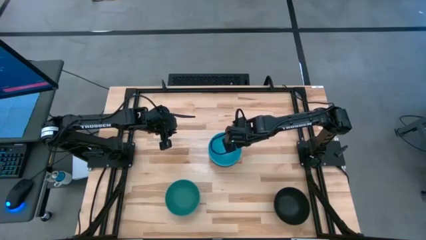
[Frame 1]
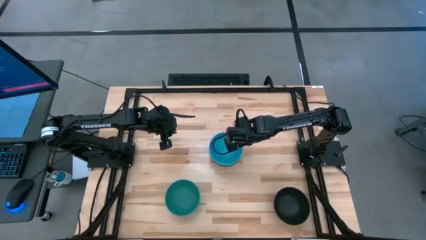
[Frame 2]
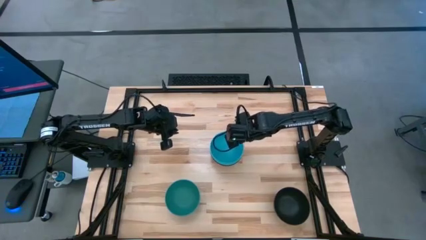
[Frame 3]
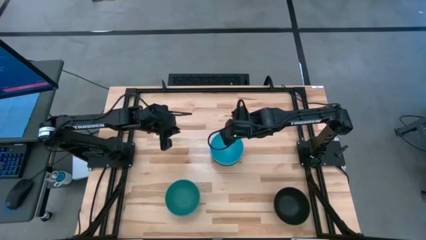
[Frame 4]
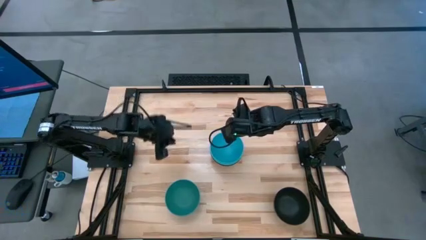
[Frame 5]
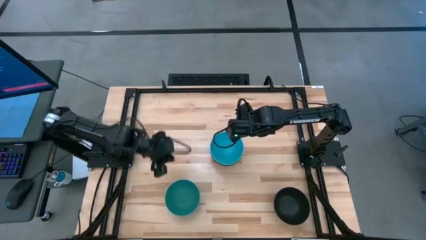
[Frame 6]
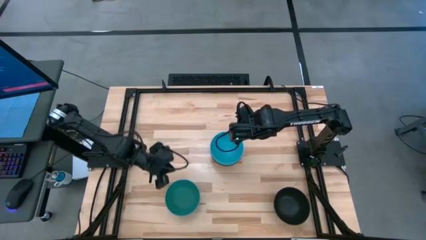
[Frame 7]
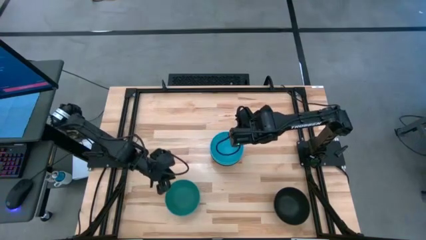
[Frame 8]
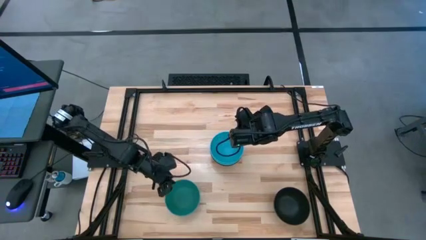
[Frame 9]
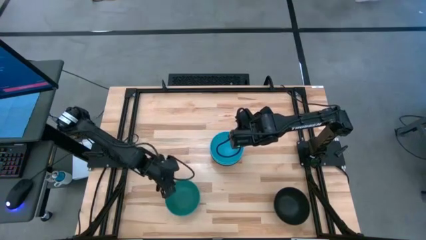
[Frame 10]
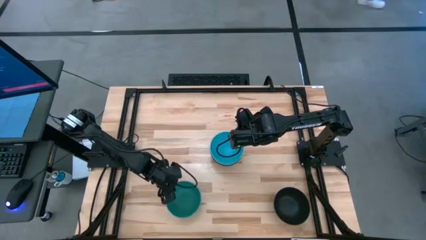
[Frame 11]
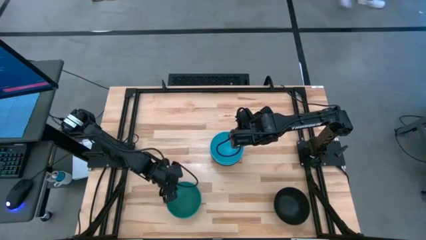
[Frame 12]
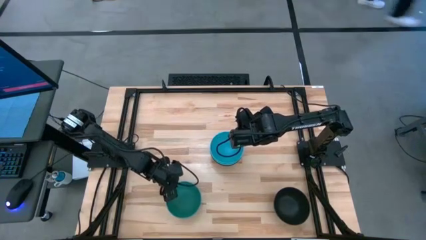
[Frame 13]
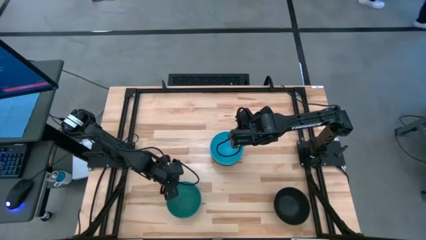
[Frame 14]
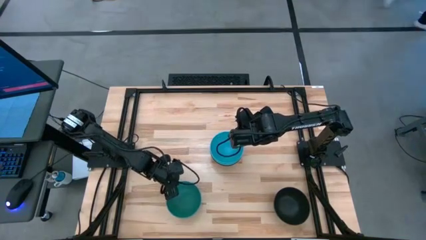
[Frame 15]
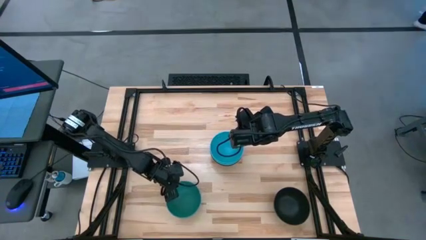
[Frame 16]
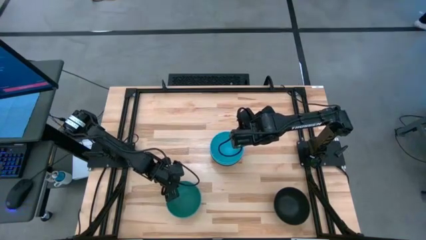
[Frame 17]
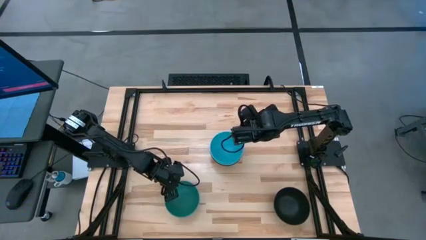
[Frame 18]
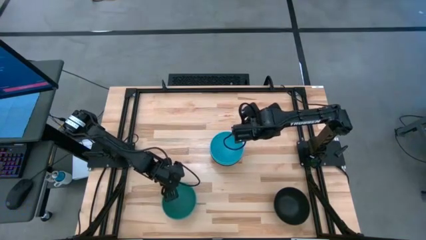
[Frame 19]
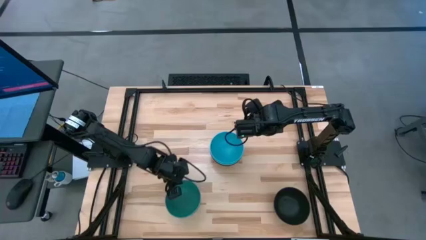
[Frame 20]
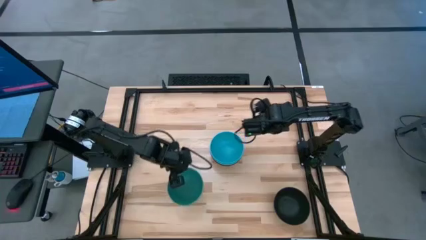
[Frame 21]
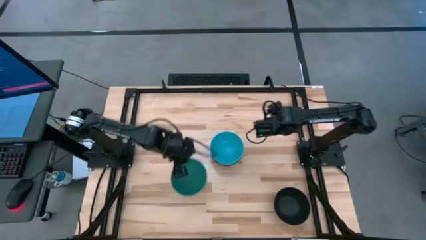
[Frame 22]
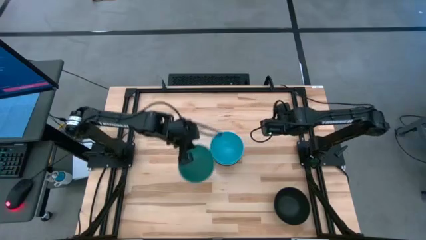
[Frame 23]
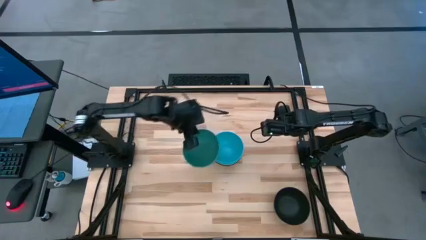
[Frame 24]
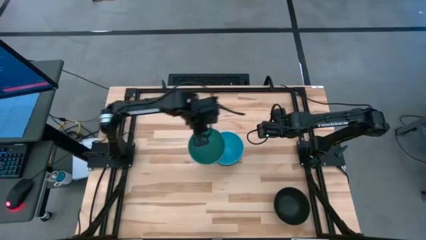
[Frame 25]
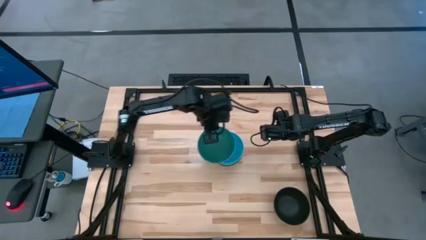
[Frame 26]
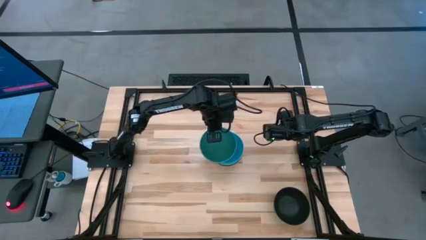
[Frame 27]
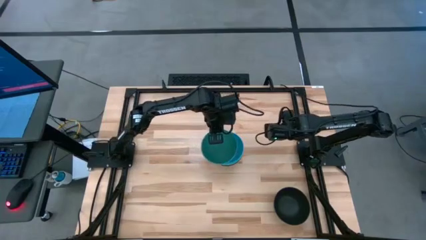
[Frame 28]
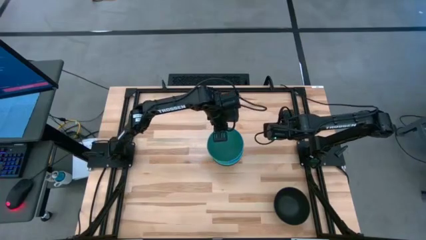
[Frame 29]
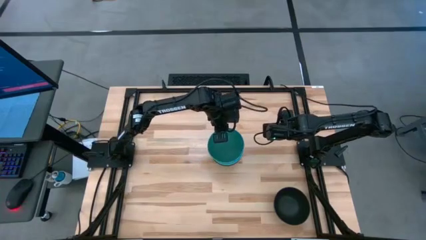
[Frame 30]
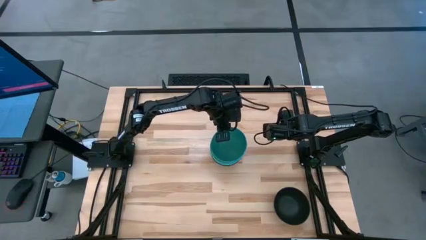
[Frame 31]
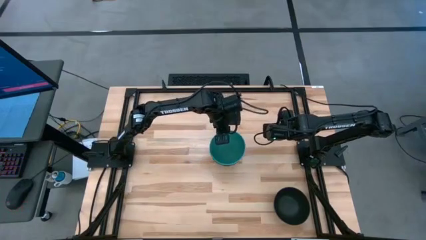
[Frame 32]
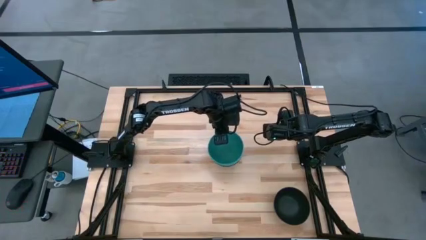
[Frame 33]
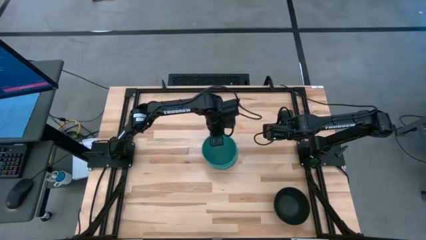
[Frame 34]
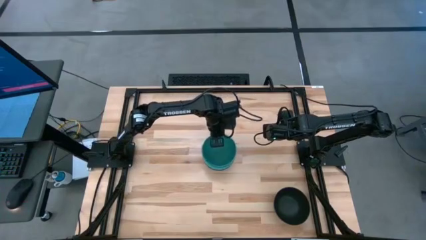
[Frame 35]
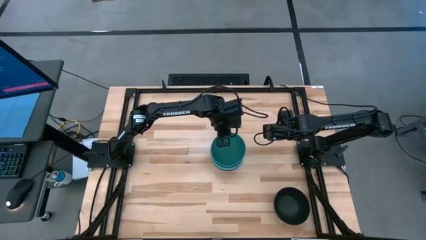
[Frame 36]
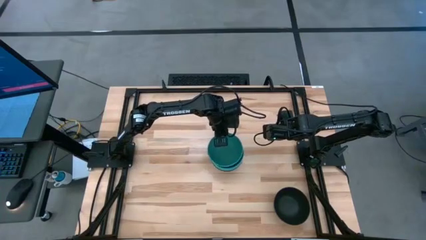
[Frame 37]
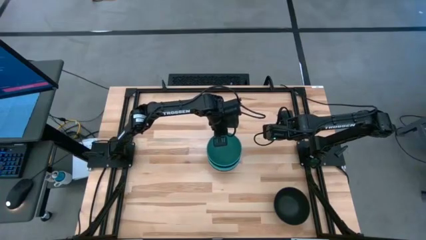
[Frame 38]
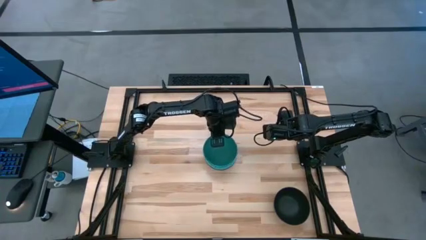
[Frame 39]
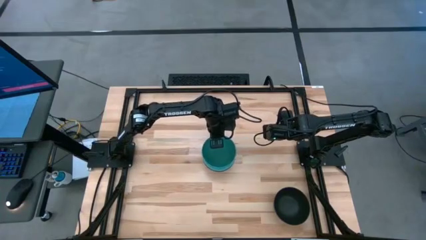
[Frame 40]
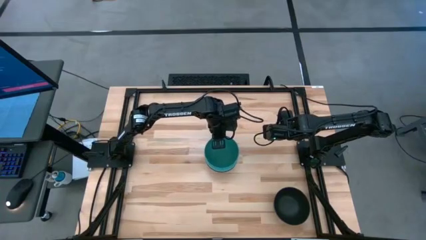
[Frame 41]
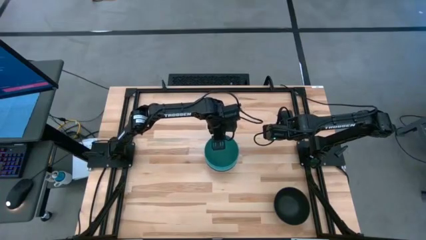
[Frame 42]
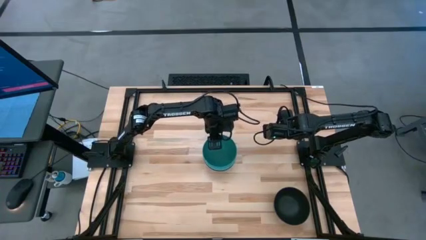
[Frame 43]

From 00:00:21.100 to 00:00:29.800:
Task: Nest bowls inside each other
Stack the green bowl on top of the blue bowl

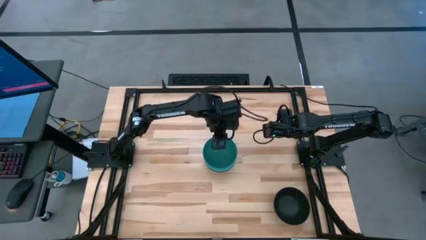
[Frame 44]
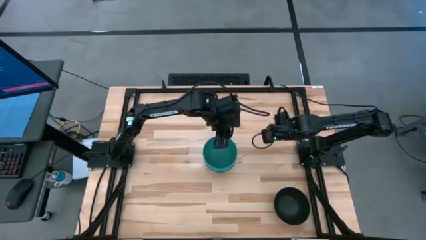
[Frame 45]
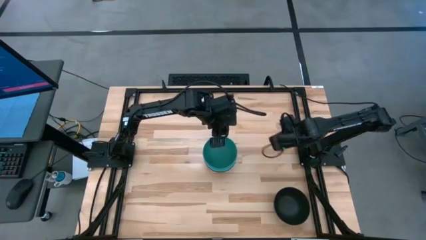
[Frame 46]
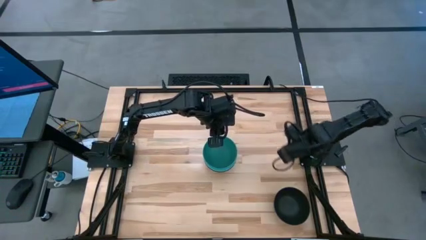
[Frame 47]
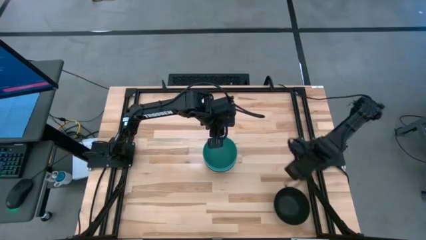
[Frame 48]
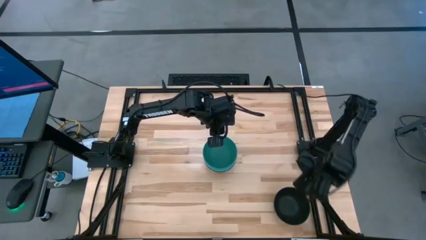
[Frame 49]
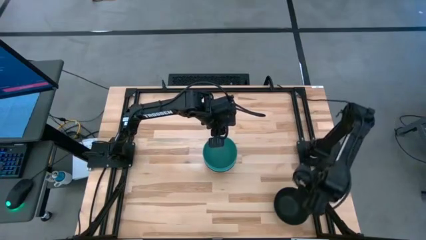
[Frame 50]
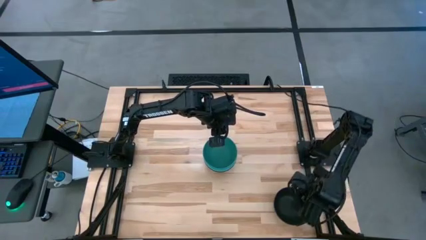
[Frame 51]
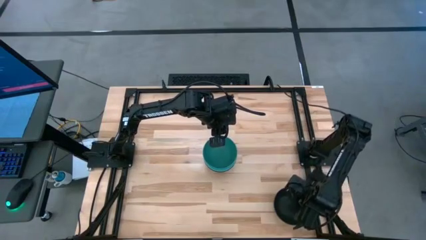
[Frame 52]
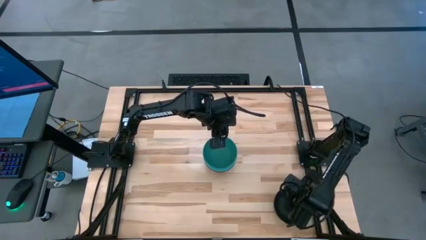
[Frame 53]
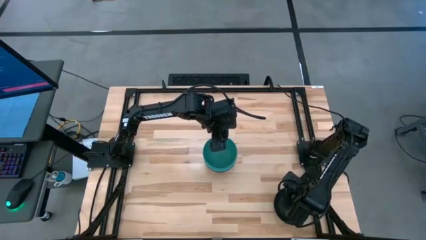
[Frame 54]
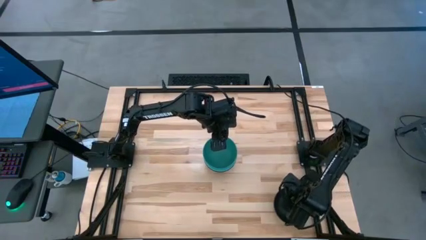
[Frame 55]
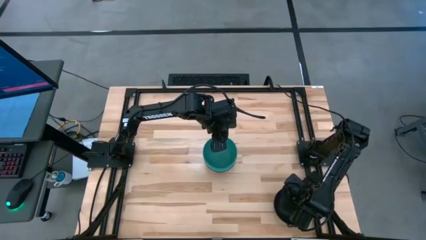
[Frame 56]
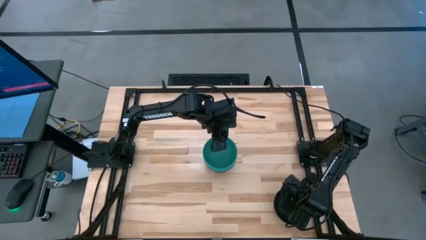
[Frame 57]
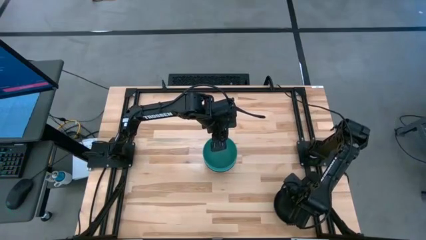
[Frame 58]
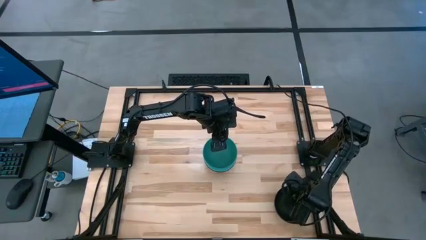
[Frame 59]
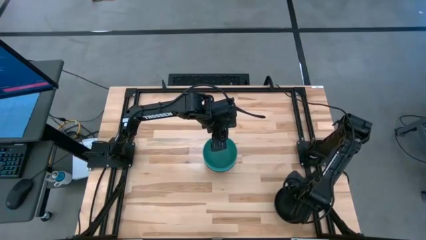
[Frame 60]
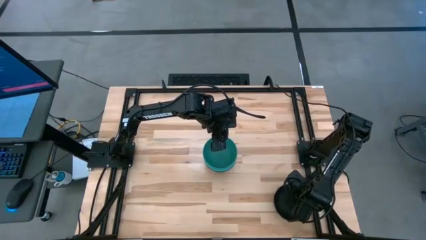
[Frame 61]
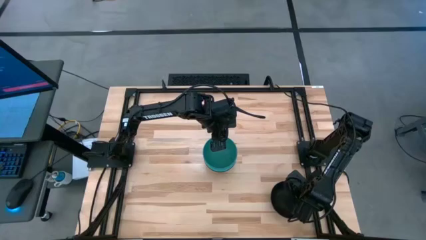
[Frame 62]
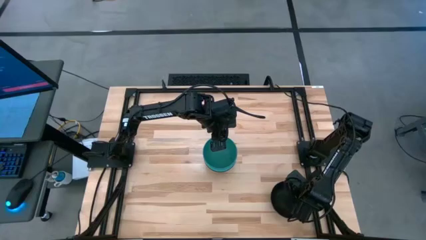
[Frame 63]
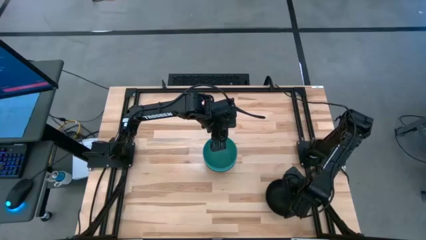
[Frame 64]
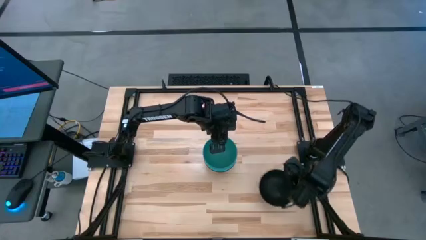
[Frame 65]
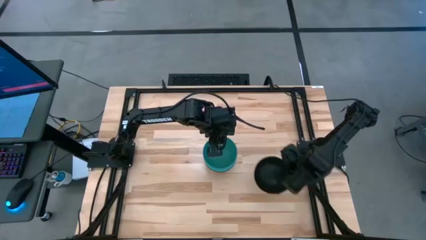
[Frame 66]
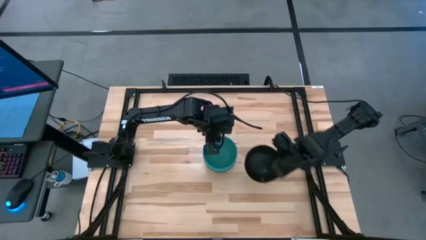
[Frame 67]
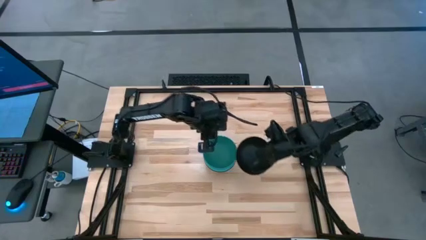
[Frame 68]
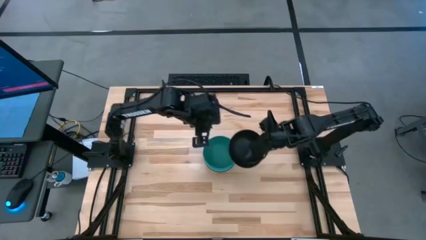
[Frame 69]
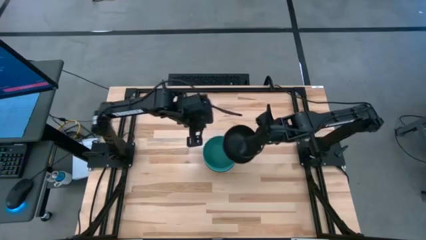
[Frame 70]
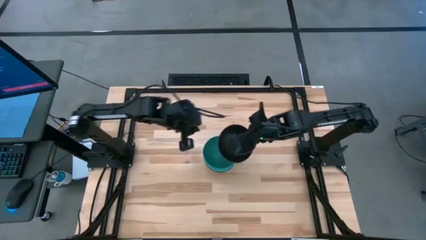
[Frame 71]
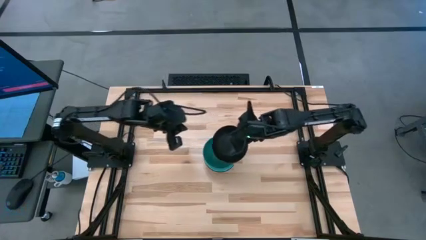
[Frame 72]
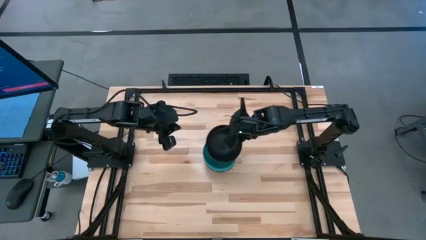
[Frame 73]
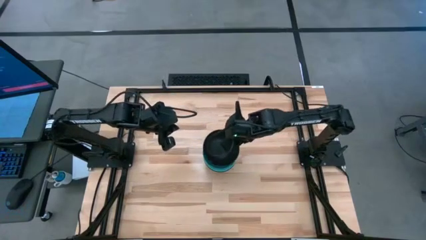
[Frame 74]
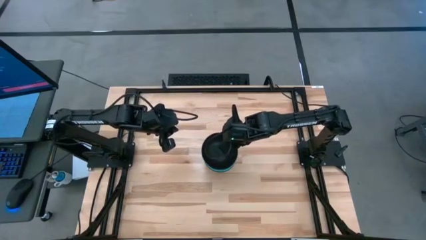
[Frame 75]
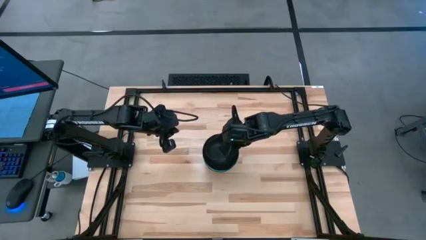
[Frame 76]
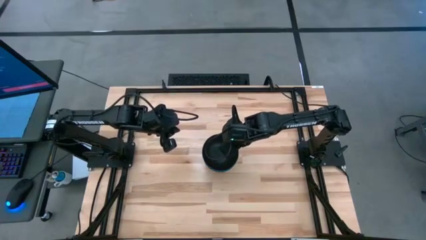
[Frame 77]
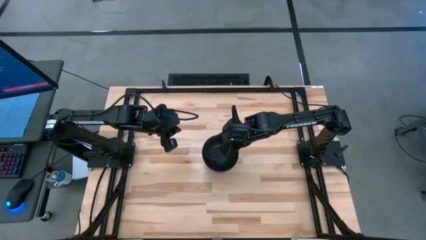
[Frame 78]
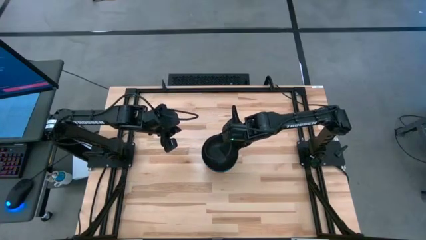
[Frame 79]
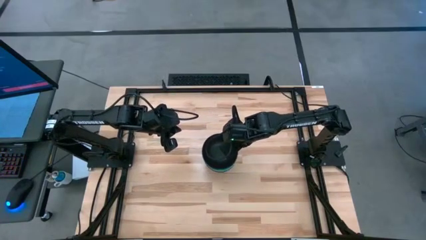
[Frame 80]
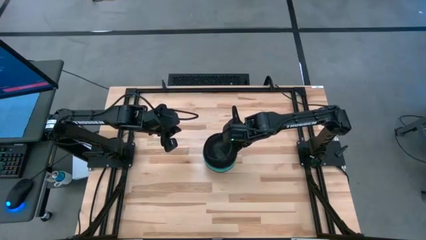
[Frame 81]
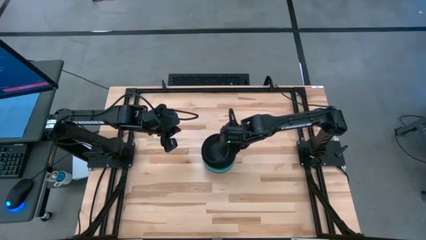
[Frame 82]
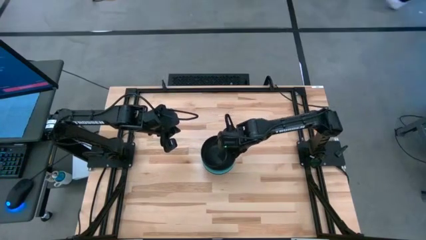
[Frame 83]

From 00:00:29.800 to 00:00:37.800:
Stack the black bowl on top of the green bowl
